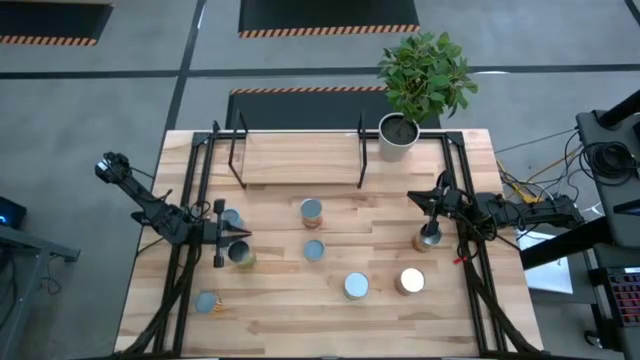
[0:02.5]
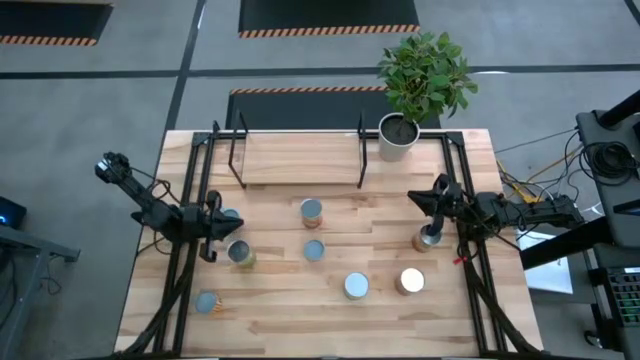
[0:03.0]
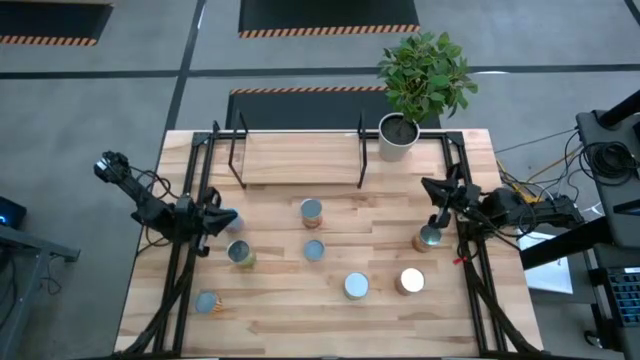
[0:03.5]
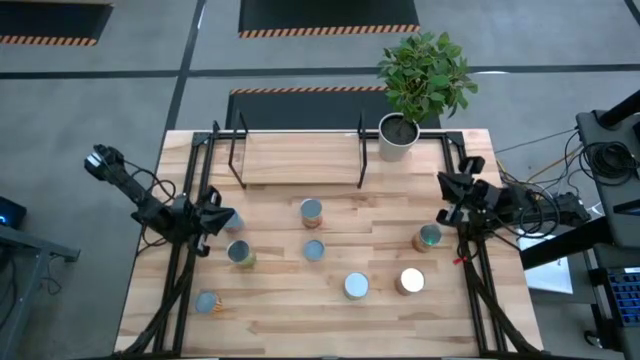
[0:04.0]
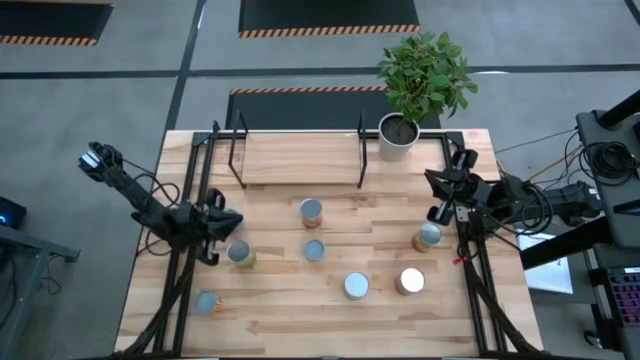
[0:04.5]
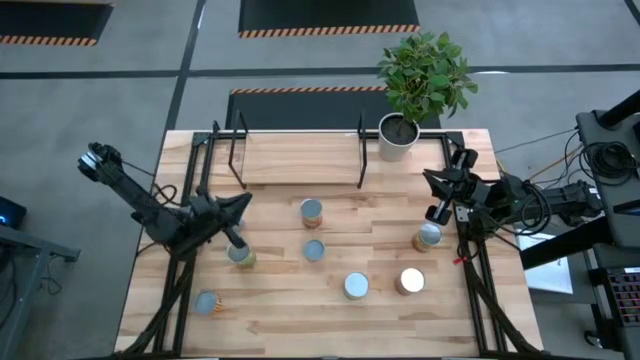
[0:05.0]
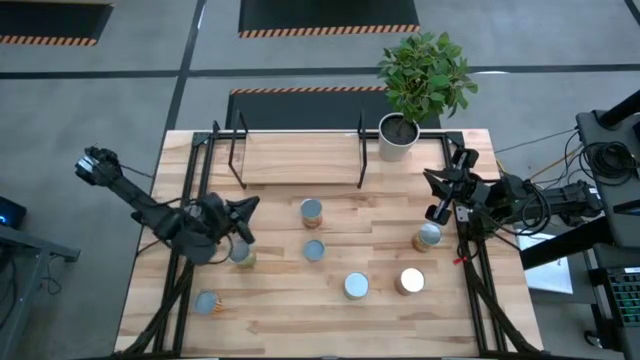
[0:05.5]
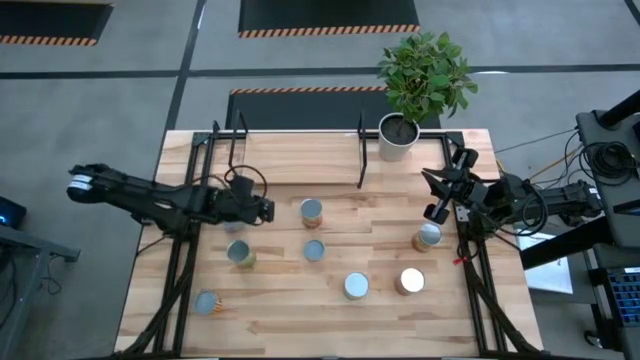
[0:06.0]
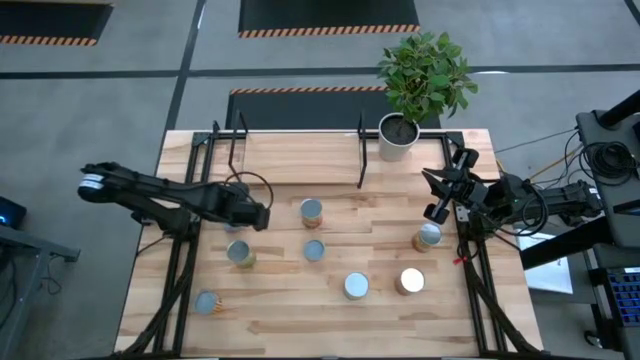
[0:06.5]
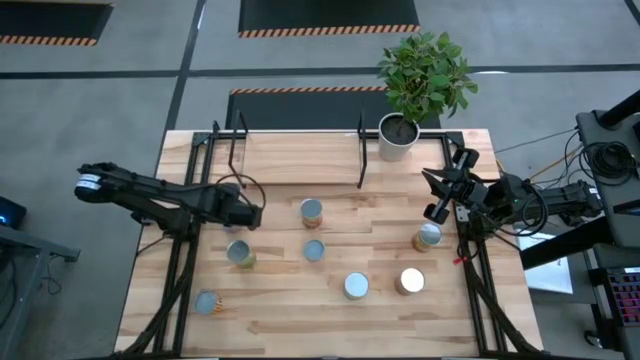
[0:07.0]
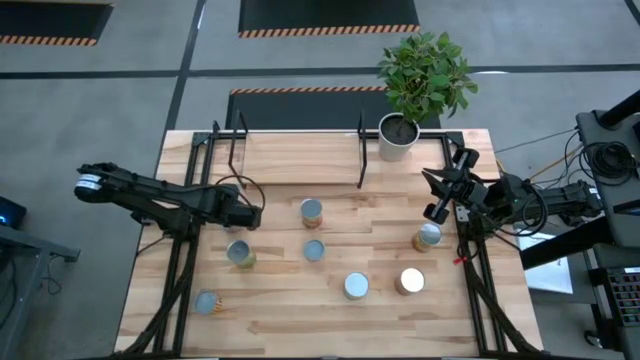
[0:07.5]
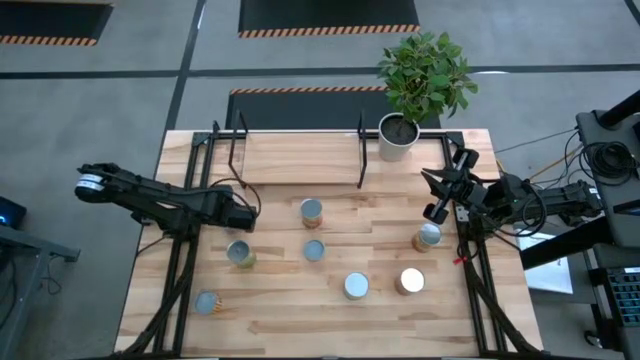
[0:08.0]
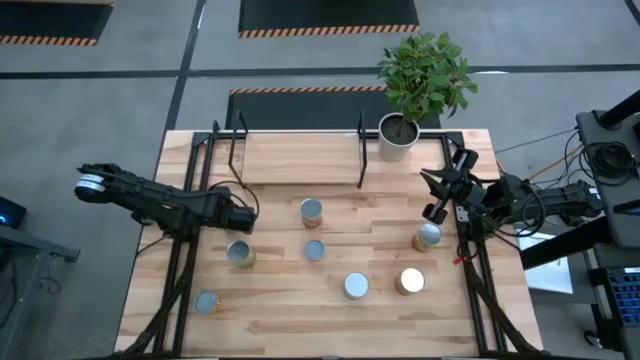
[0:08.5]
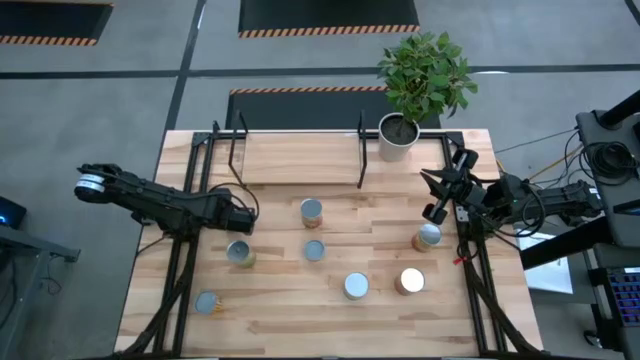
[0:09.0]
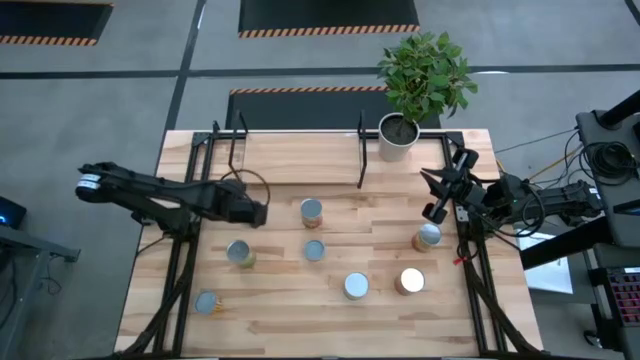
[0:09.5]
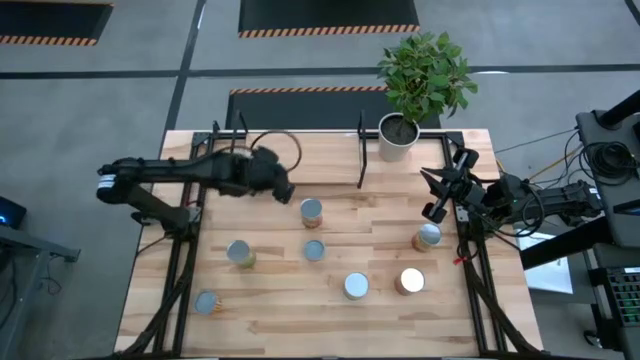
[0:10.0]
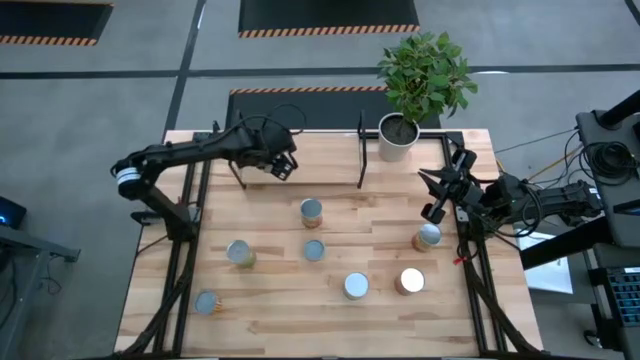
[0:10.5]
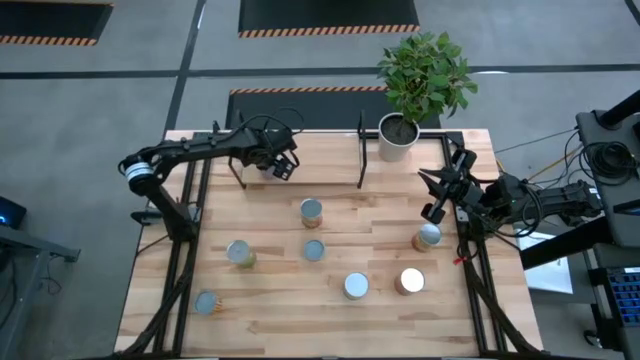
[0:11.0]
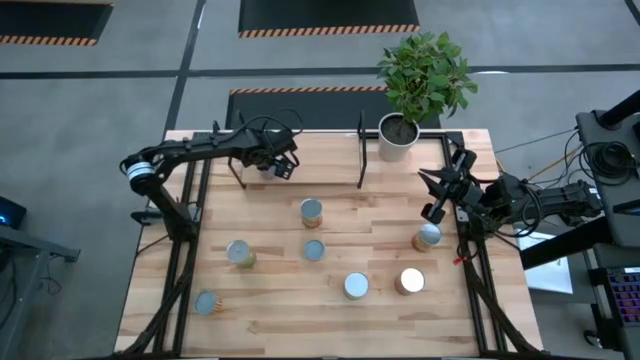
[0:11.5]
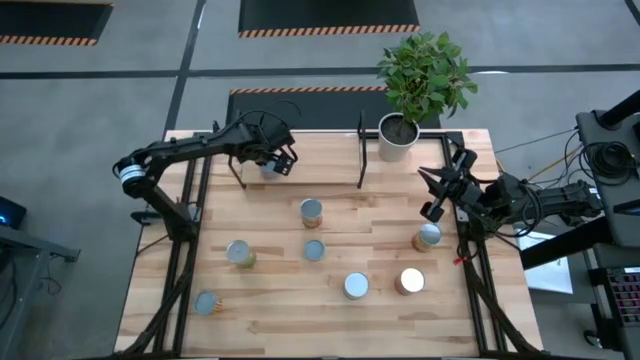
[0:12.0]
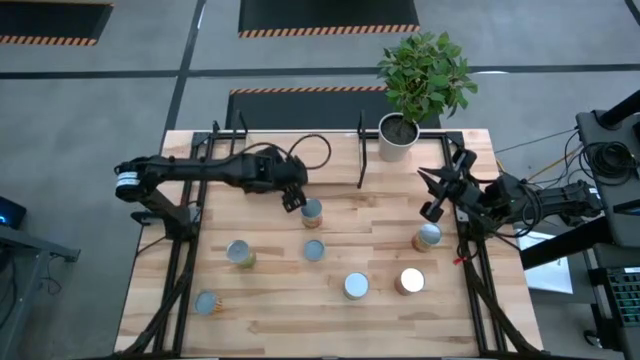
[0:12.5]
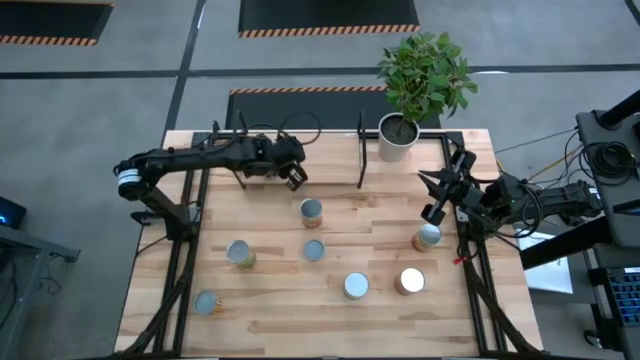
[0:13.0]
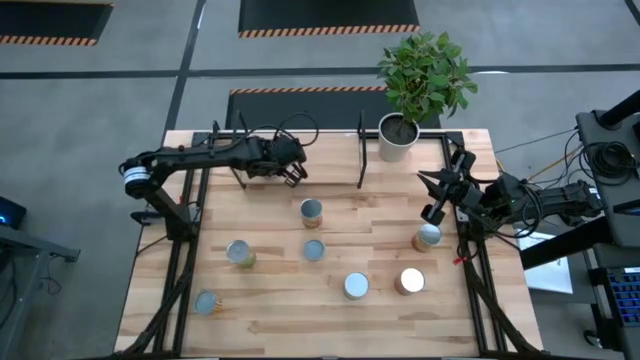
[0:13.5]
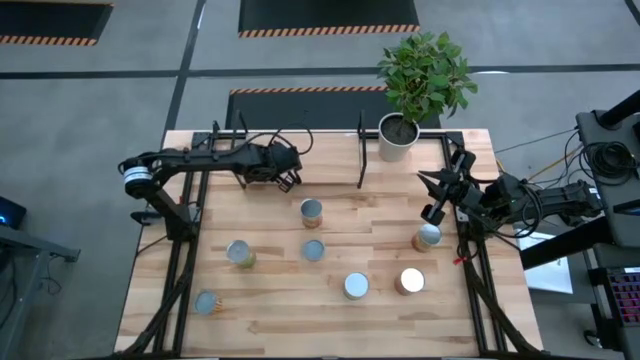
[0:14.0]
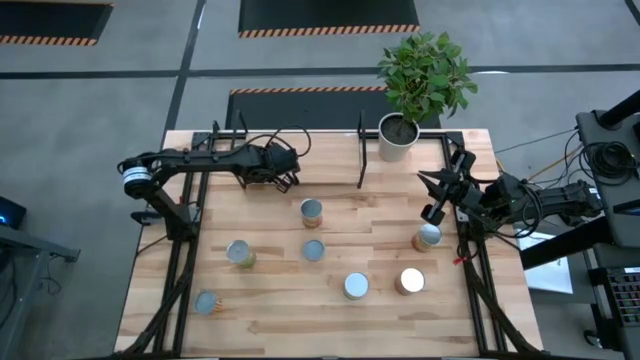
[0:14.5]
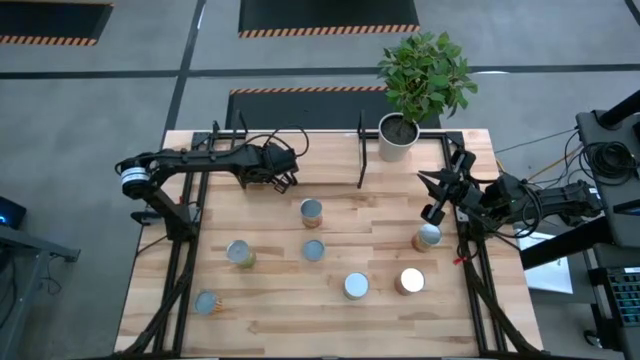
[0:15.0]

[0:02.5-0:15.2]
Task: Pick and place cans onto a shelf
Put the canned mixed vegetables on the shelf

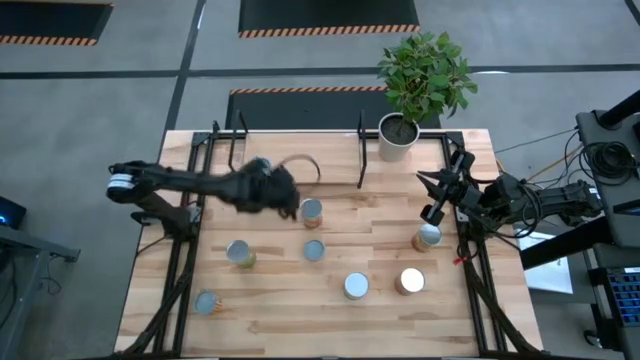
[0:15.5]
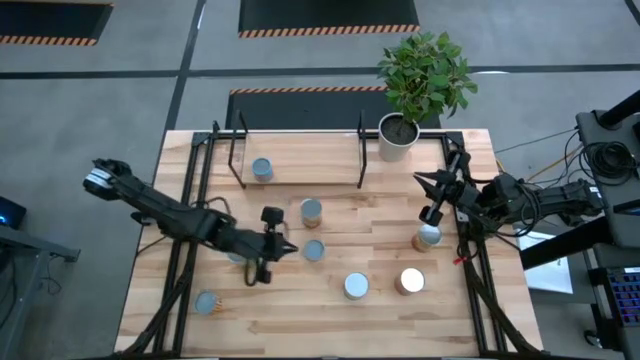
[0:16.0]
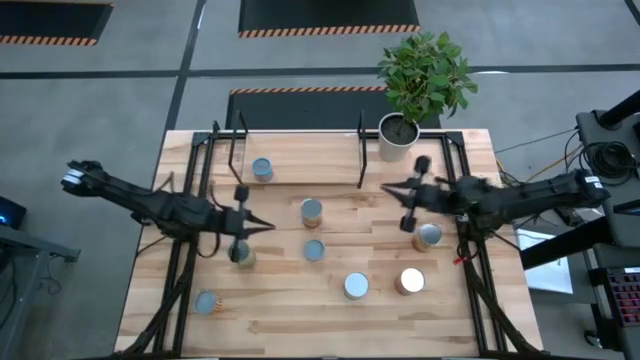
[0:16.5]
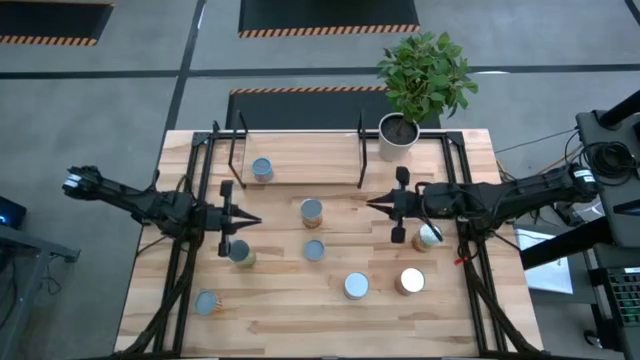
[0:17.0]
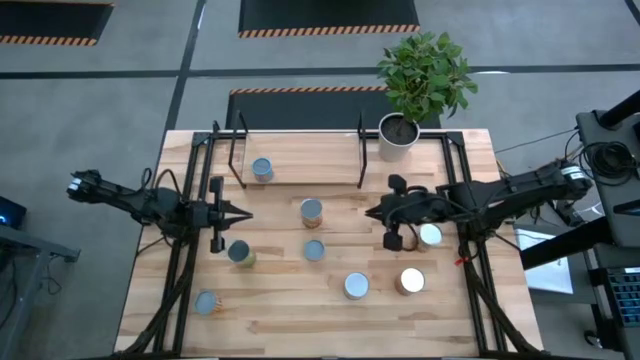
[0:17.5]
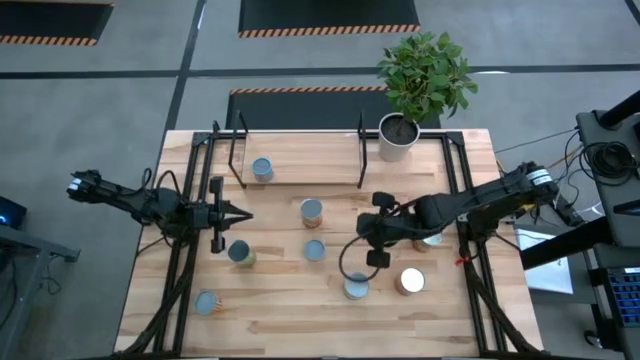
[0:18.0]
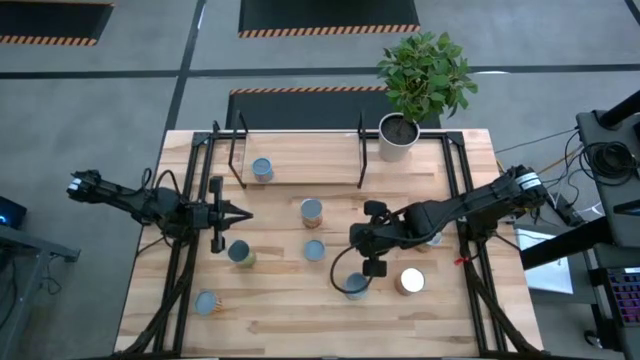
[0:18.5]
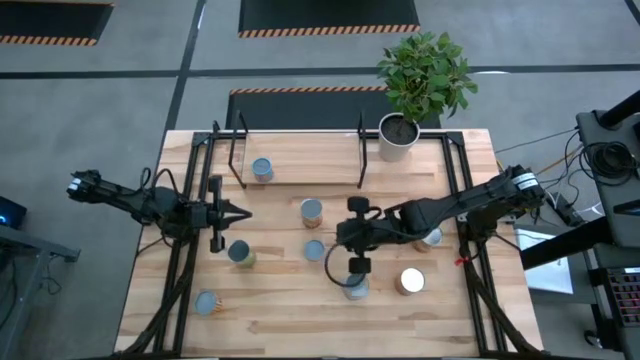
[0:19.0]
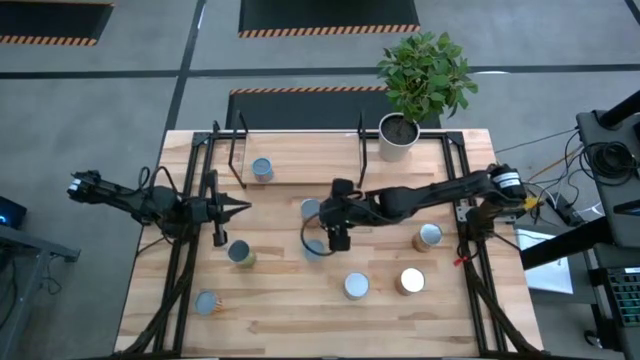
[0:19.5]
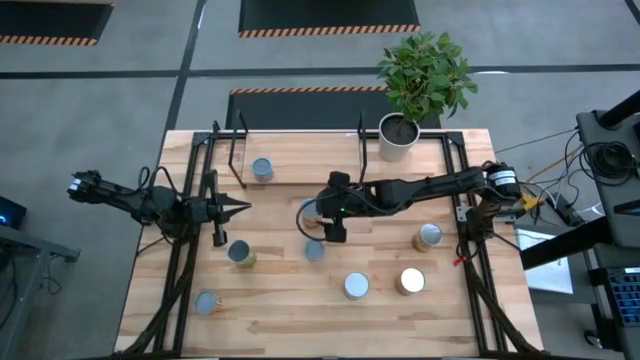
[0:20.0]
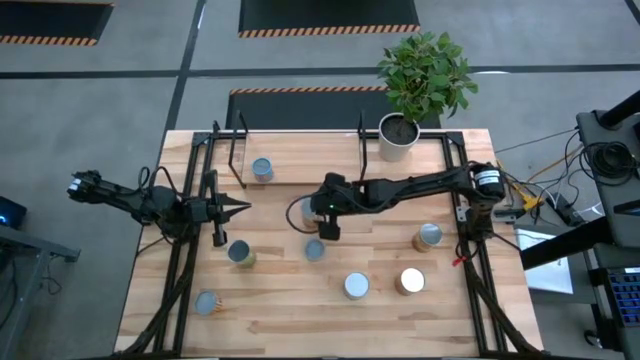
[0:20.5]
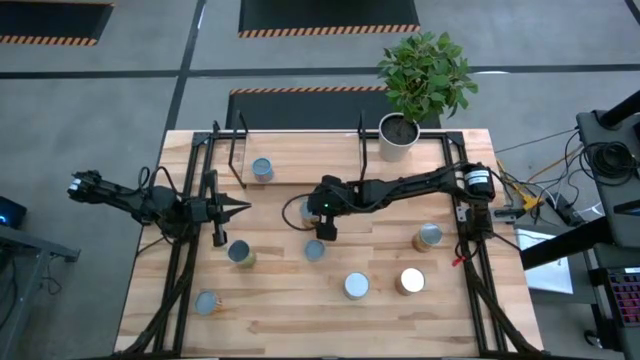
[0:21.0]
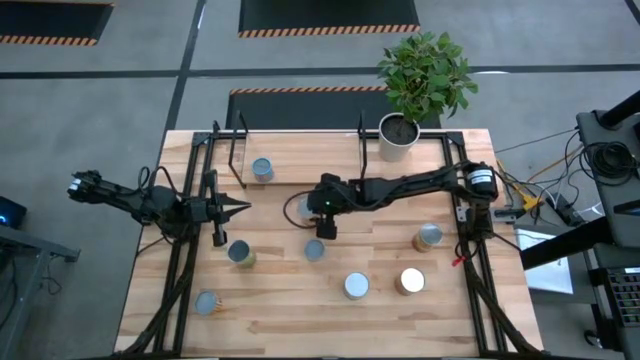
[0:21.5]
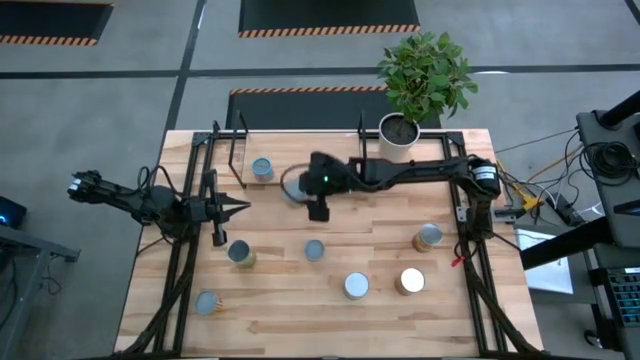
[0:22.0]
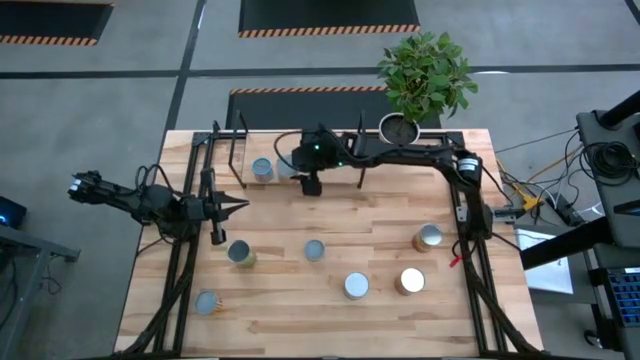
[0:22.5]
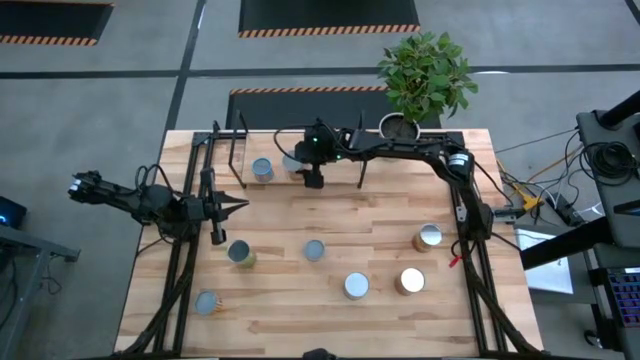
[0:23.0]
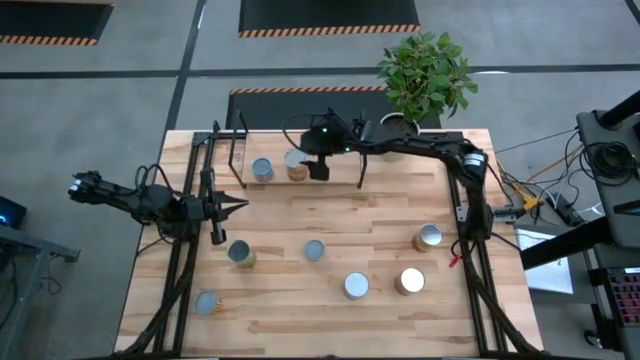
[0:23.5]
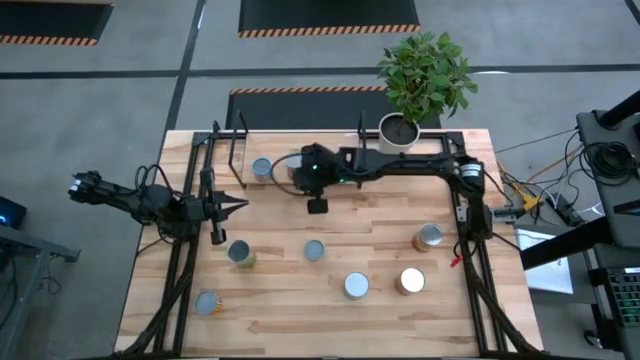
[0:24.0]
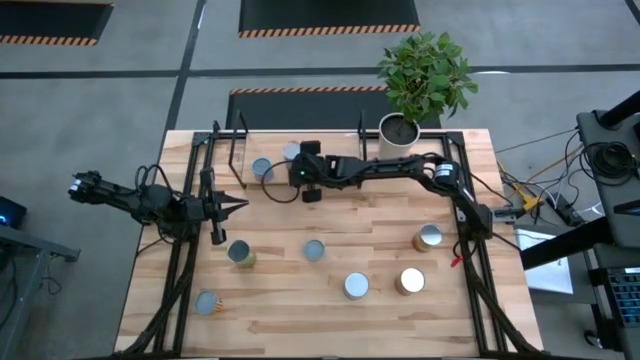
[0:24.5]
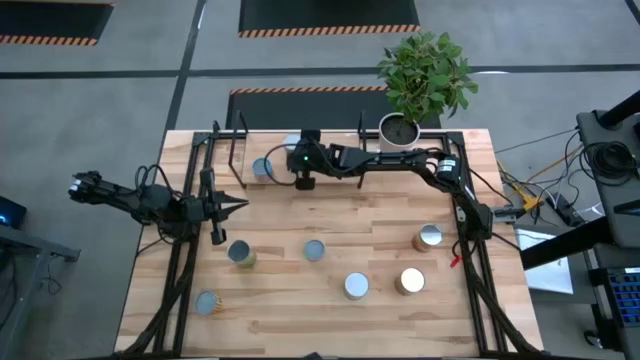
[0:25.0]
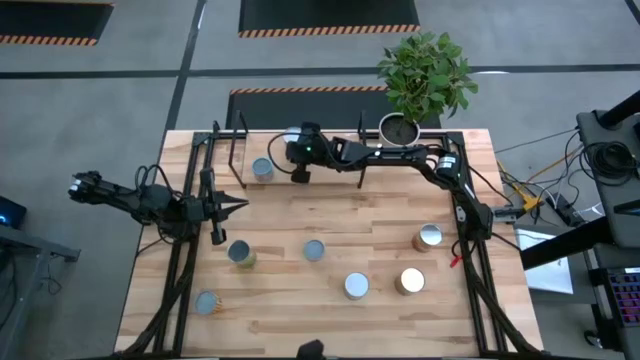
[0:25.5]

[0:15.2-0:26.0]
Put the top canned corn on the shelf
